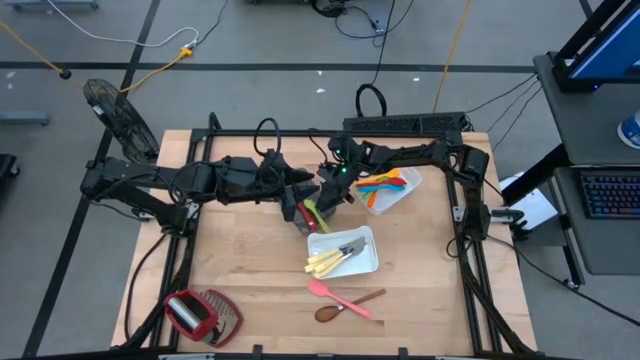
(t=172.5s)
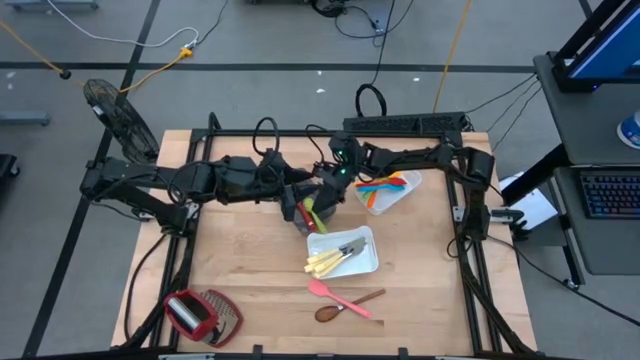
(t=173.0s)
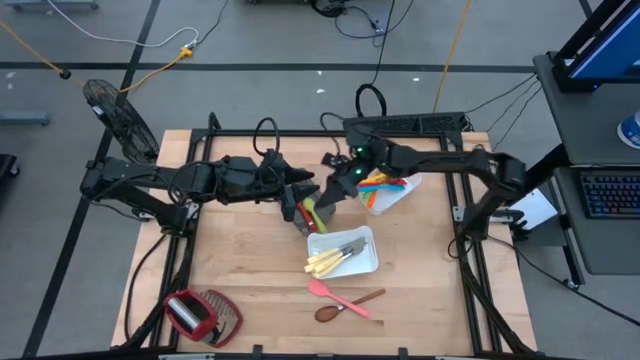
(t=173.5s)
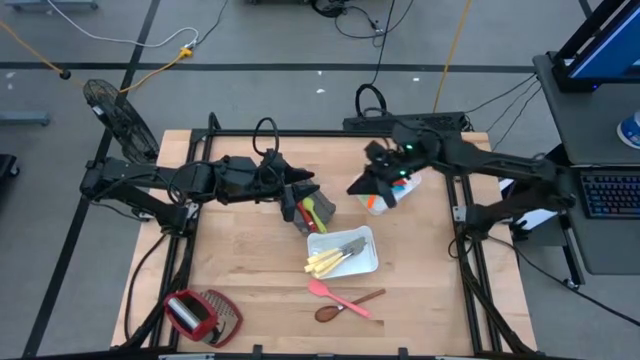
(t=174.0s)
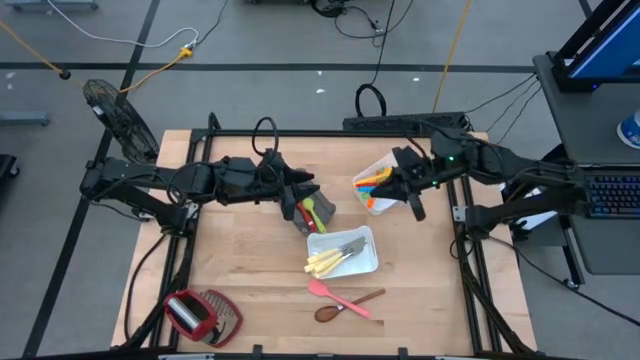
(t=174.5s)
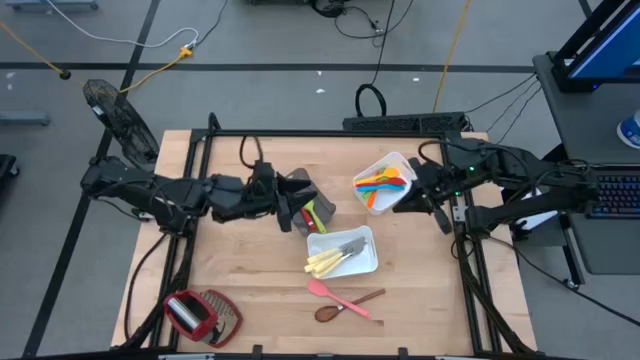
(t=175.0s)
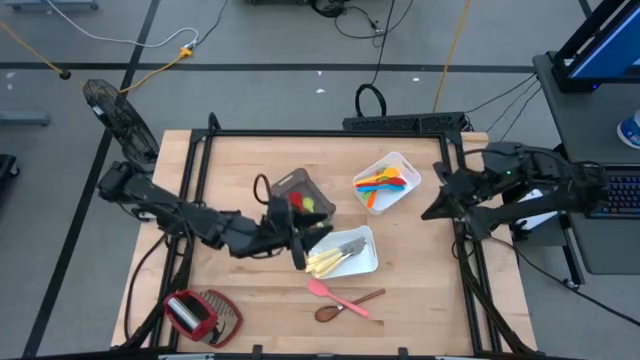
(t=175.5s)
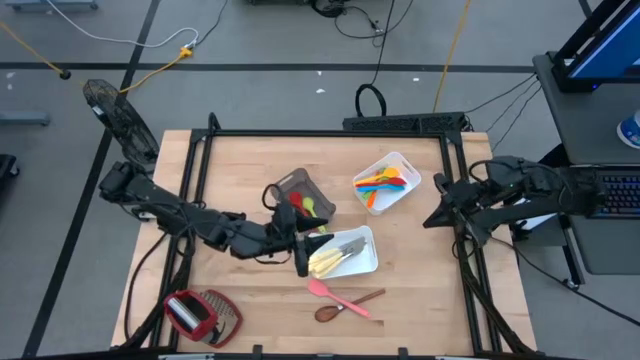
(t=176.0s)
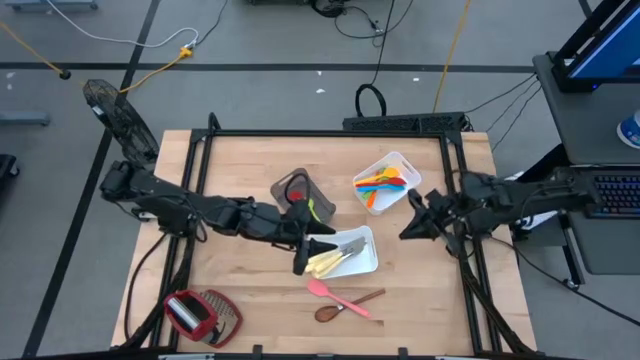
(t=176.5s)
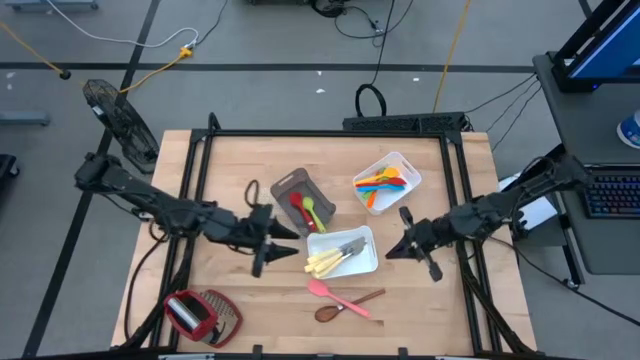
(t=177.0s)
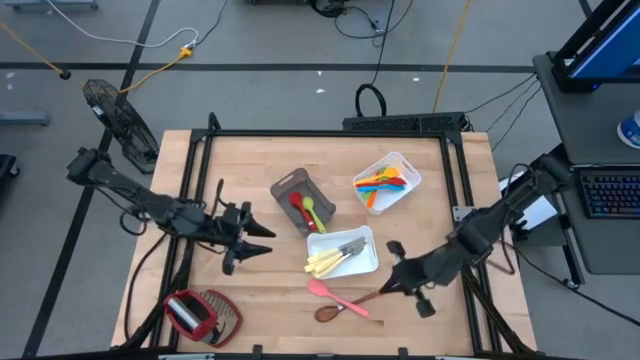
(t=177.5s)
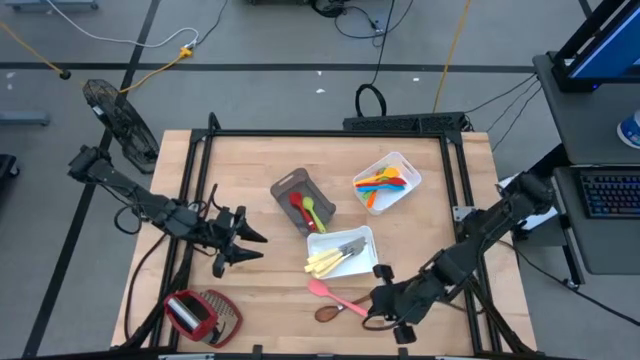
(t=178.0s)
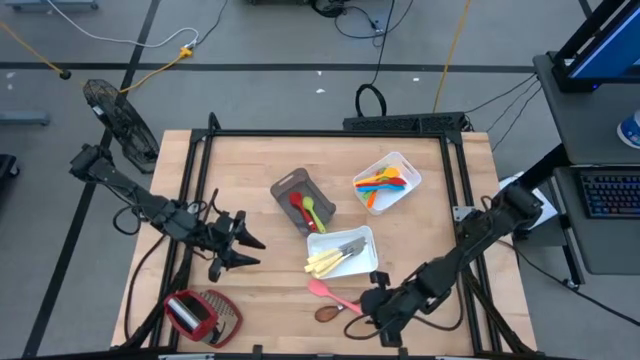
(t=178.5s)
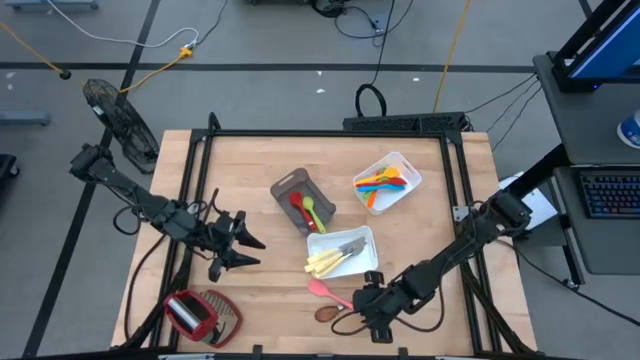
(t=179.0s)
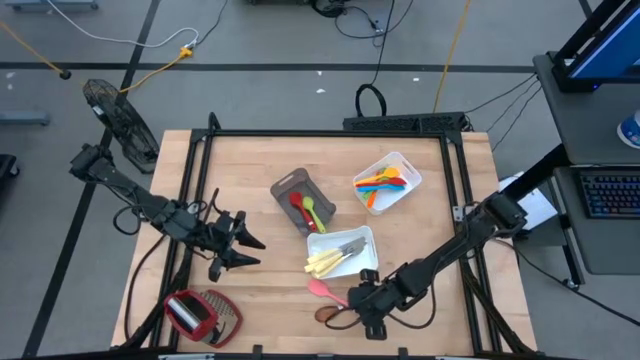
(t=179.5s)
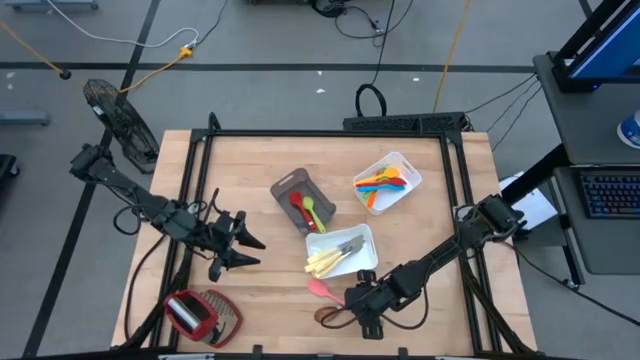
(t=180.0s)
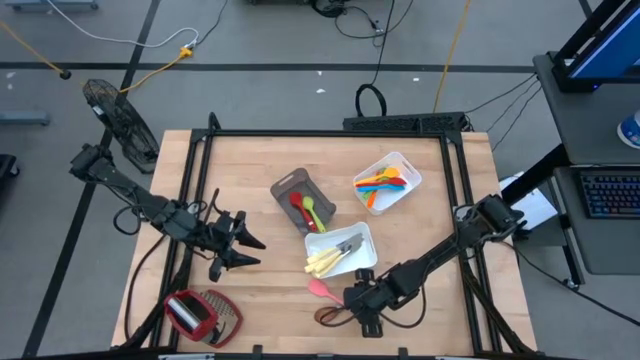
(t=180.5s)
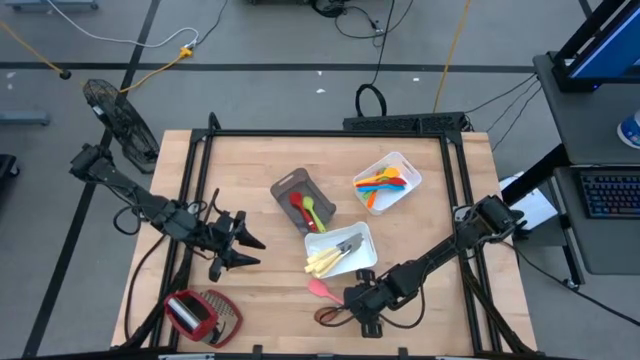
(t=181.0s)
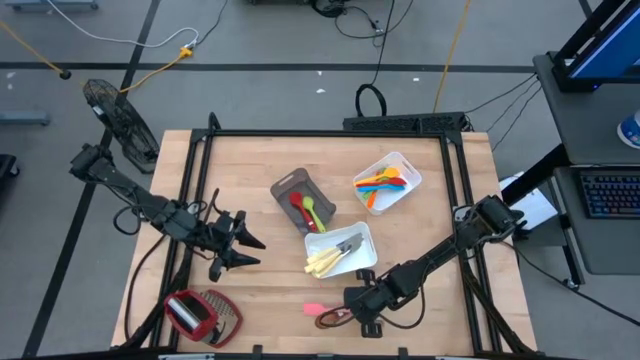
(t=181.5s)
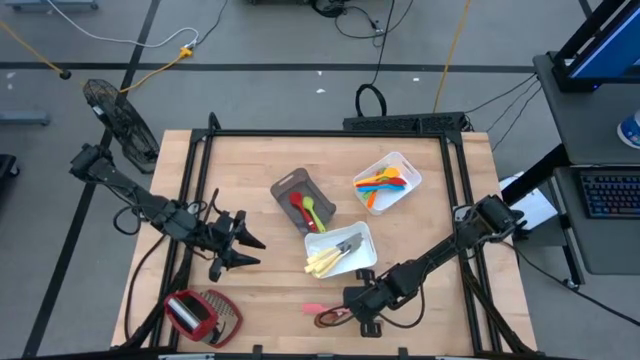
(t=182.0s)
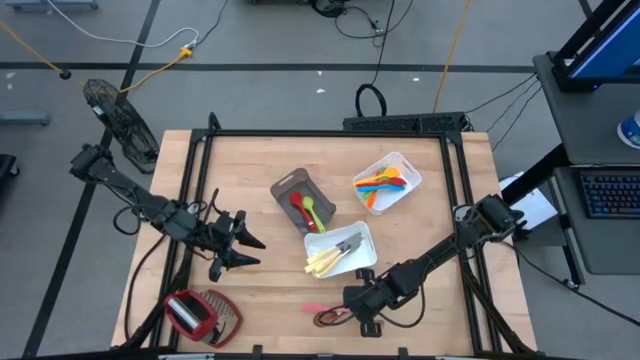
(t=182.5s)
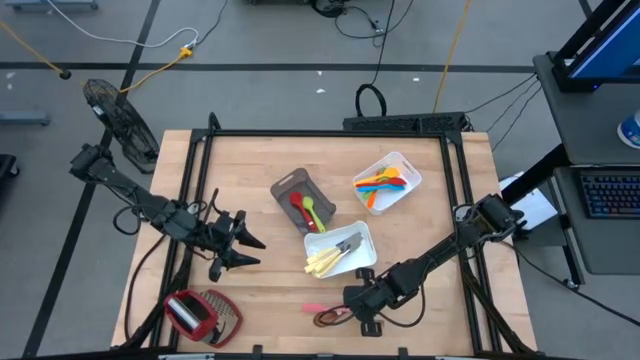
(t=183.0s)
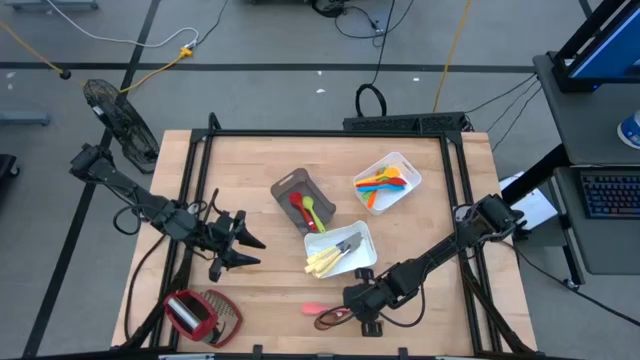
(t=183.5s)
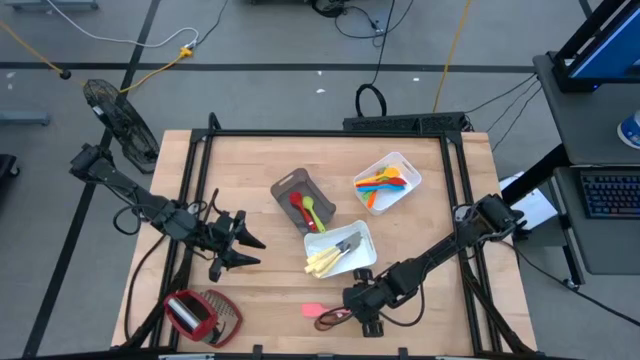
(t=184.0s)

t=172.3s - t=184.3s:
Task: Pick & Place Kitchen Items
Put the pink spatula into the top white bin

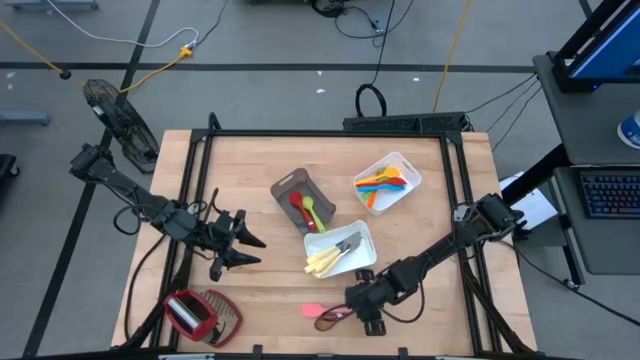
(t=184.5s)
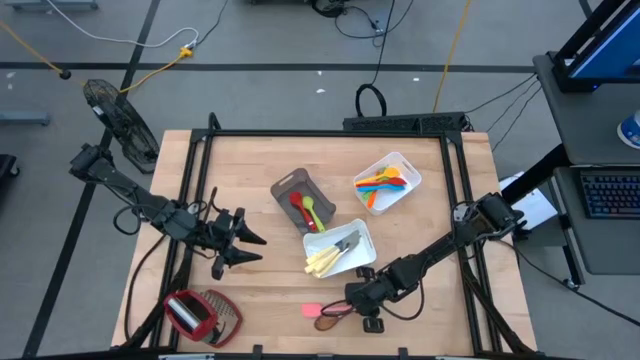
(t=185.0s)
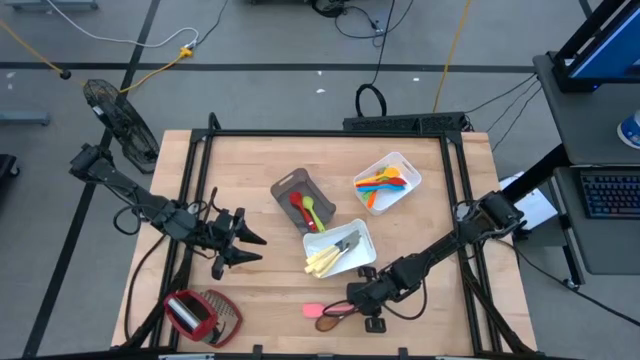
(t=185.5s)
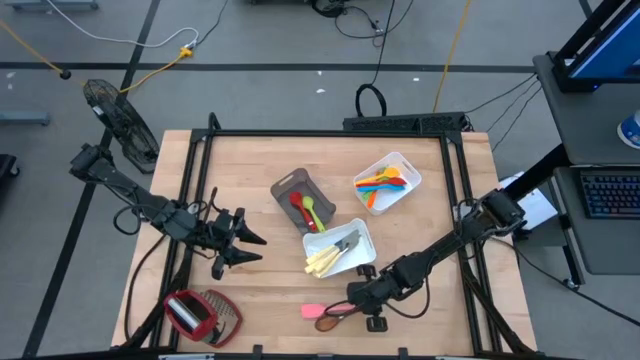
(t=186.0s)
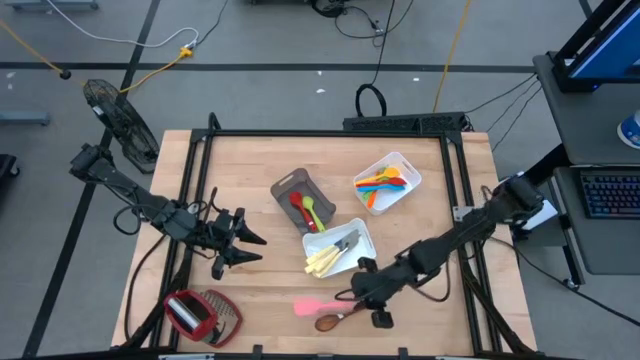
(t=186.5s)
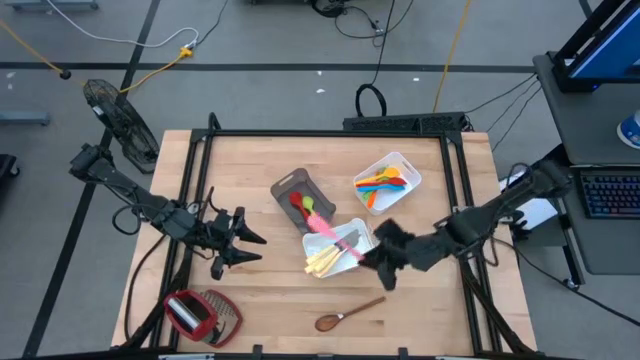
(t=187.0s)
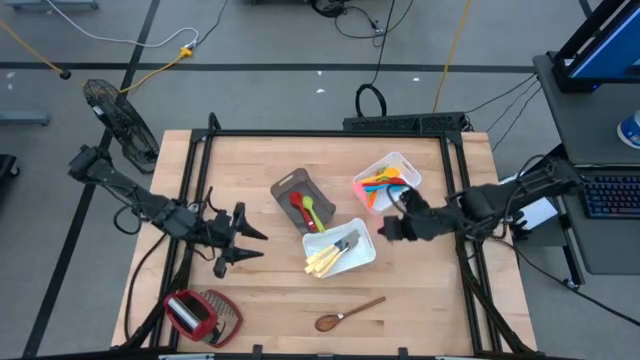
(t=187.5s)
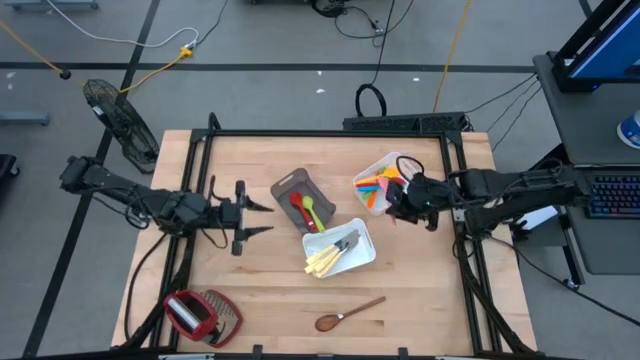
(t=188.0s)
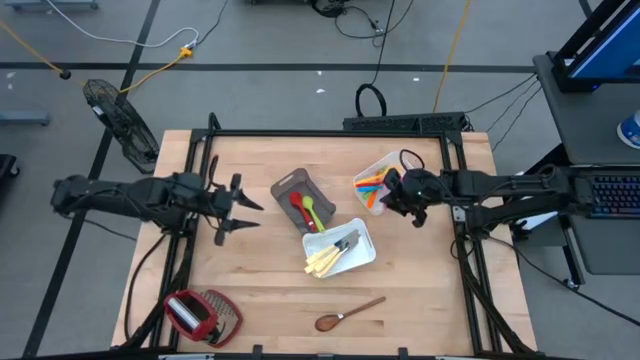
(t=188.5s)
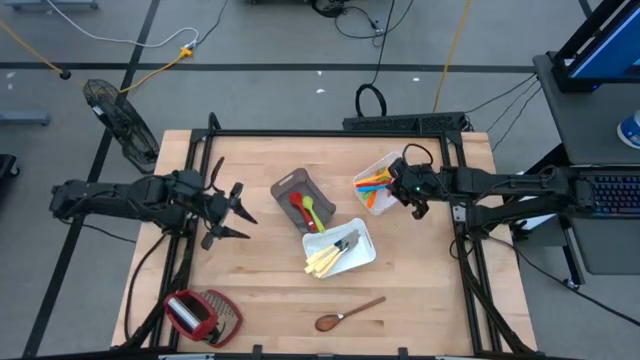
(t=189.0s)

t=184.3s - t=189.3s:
Put the pink spatula into the top white bin
